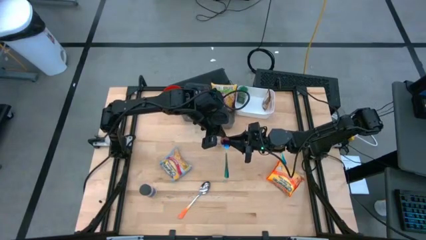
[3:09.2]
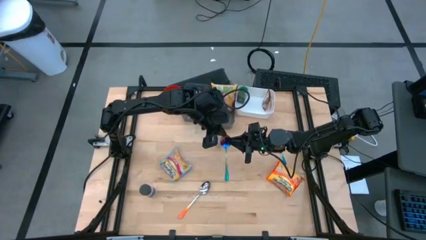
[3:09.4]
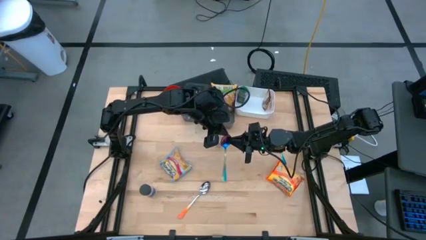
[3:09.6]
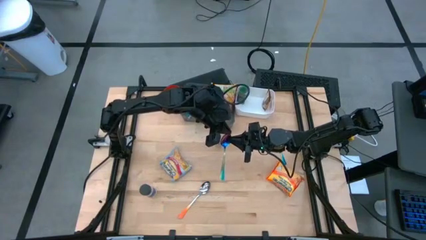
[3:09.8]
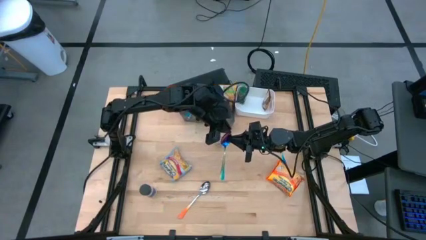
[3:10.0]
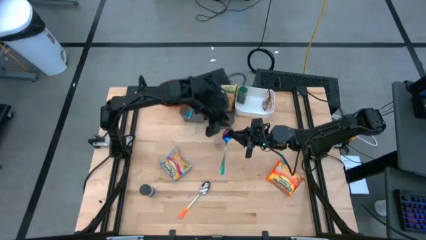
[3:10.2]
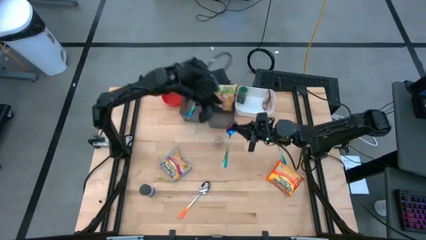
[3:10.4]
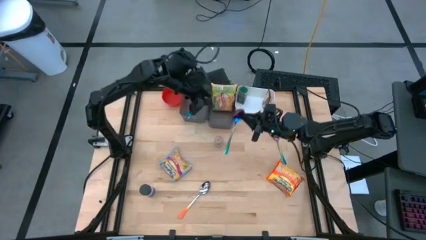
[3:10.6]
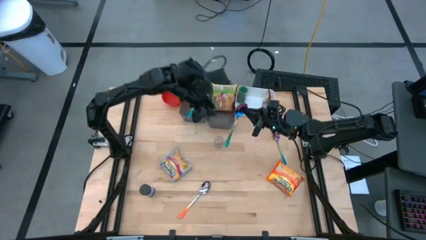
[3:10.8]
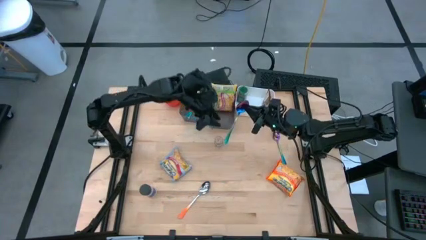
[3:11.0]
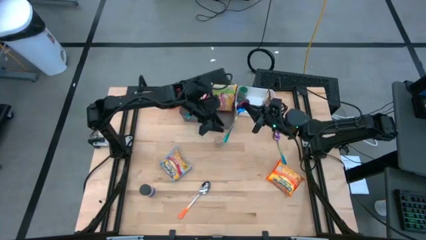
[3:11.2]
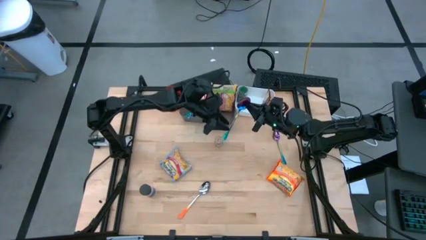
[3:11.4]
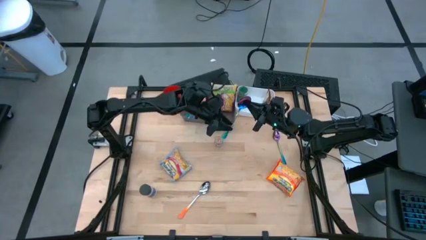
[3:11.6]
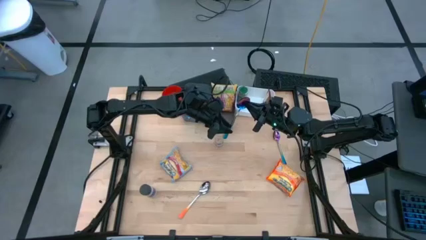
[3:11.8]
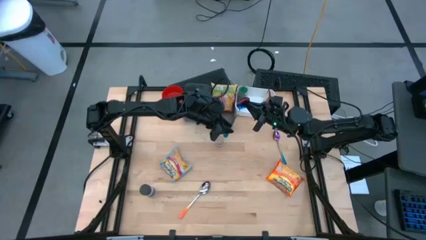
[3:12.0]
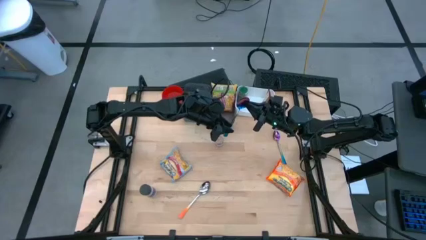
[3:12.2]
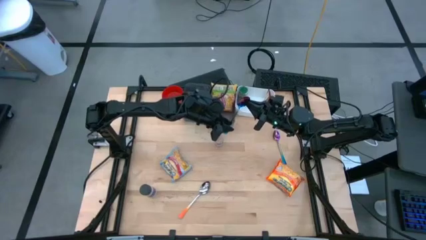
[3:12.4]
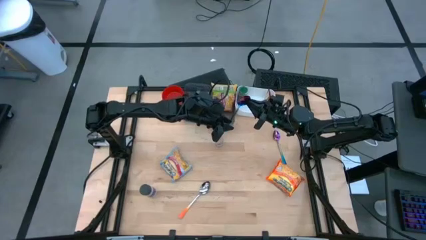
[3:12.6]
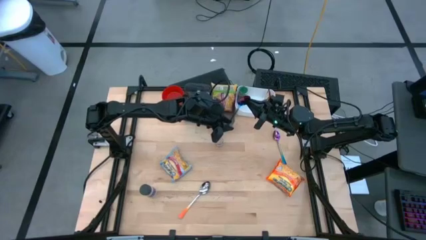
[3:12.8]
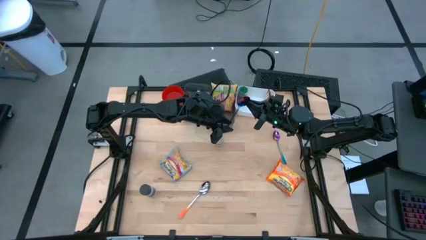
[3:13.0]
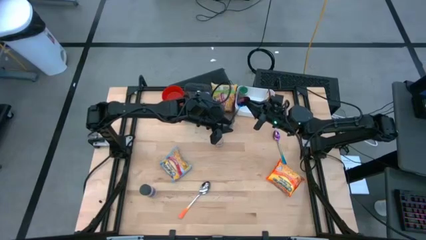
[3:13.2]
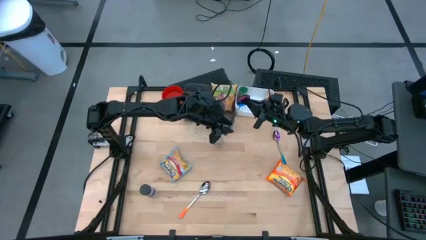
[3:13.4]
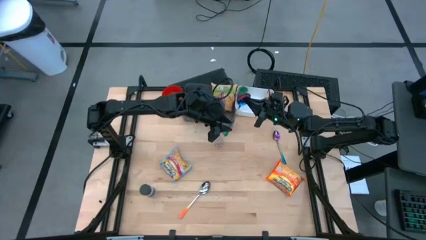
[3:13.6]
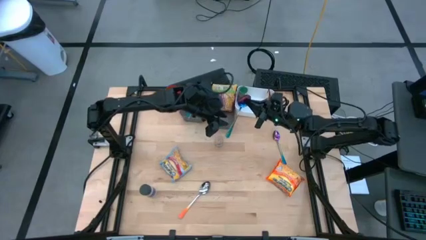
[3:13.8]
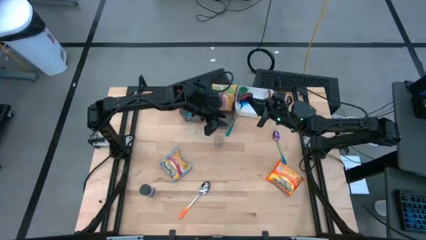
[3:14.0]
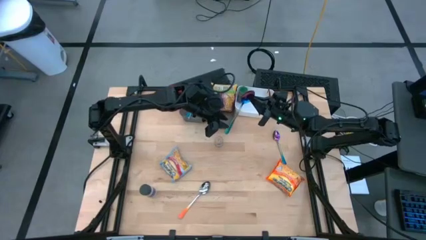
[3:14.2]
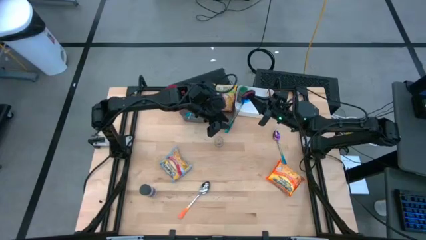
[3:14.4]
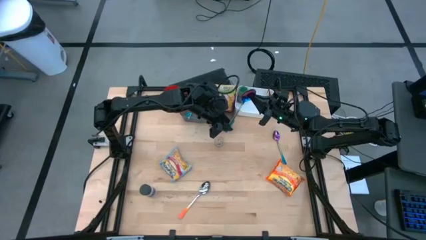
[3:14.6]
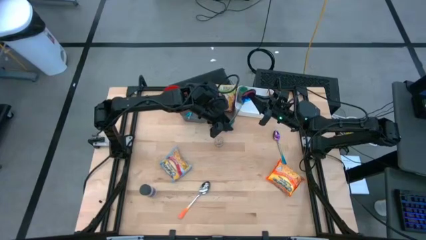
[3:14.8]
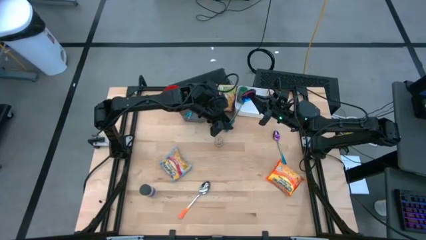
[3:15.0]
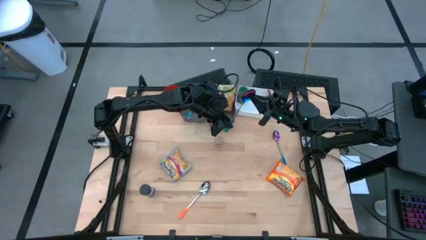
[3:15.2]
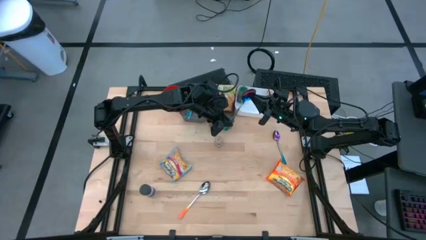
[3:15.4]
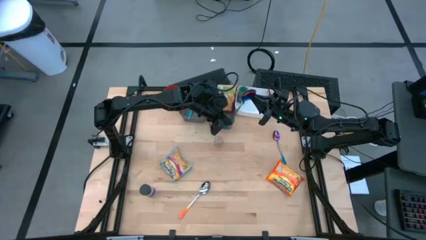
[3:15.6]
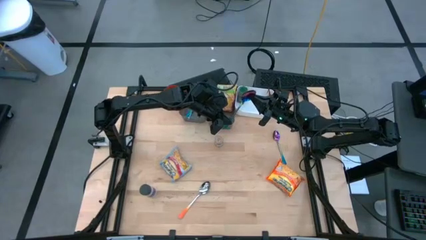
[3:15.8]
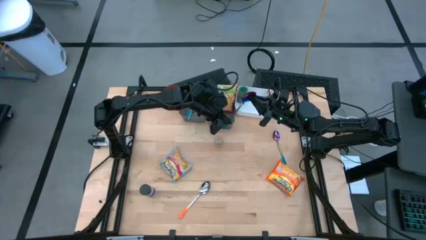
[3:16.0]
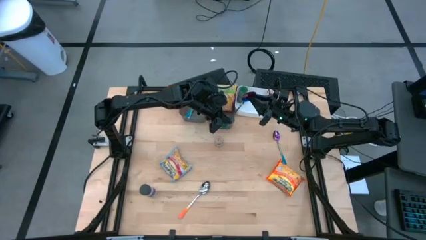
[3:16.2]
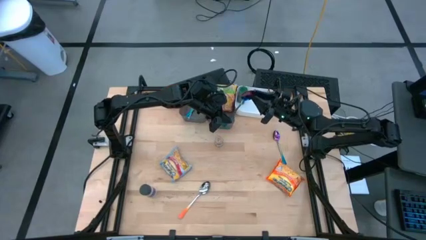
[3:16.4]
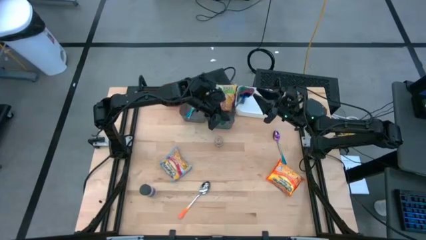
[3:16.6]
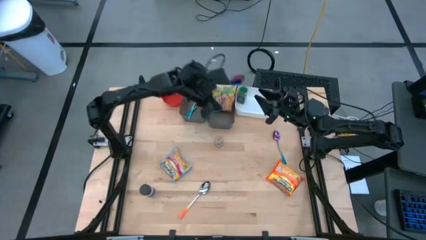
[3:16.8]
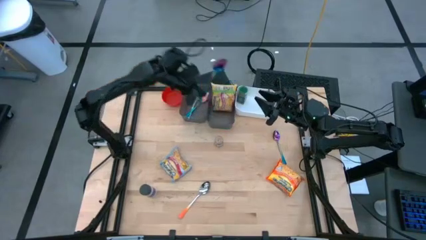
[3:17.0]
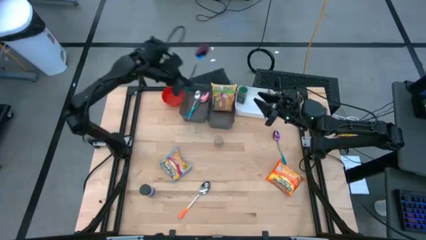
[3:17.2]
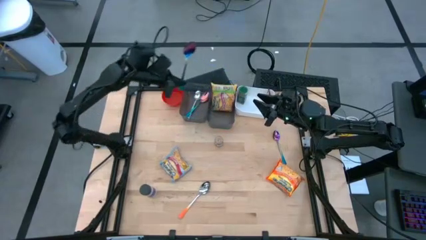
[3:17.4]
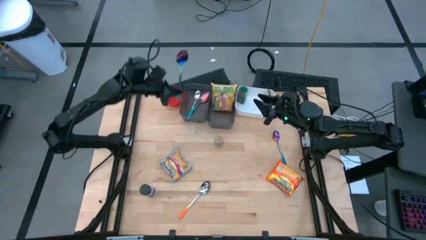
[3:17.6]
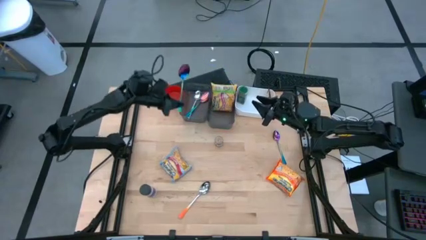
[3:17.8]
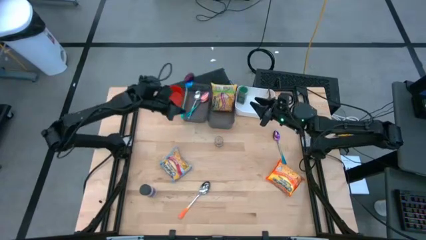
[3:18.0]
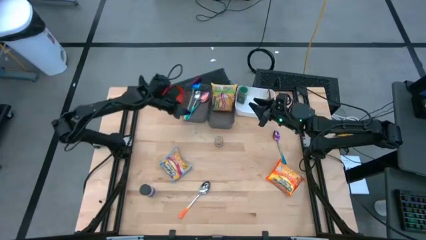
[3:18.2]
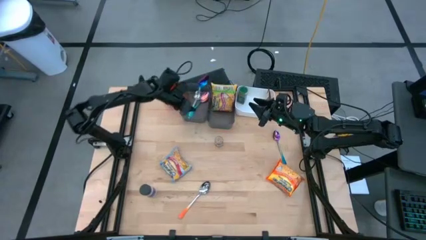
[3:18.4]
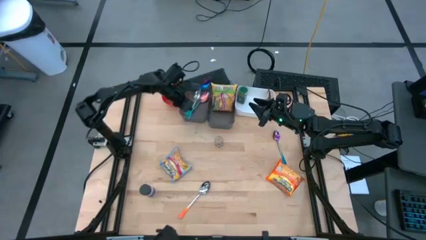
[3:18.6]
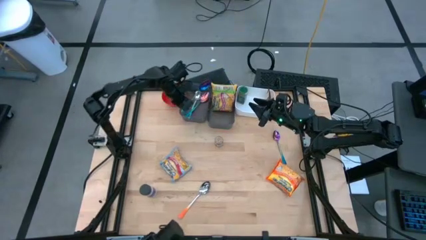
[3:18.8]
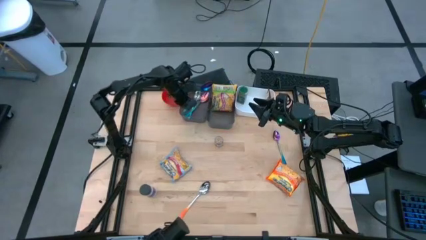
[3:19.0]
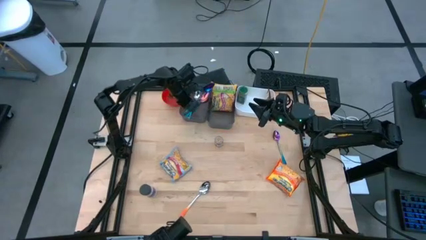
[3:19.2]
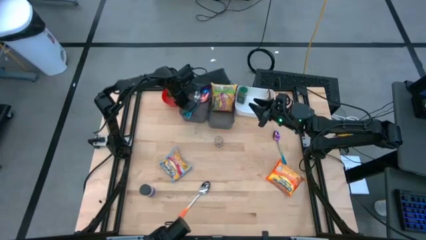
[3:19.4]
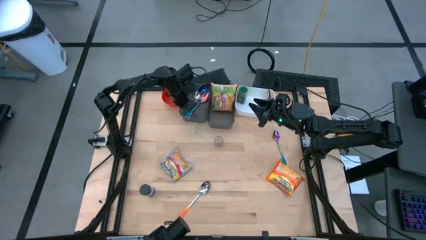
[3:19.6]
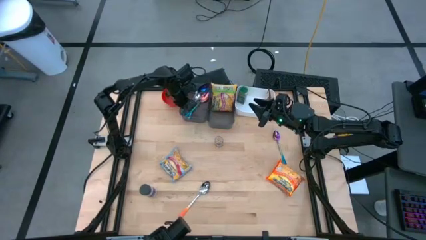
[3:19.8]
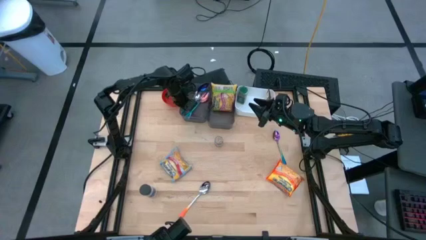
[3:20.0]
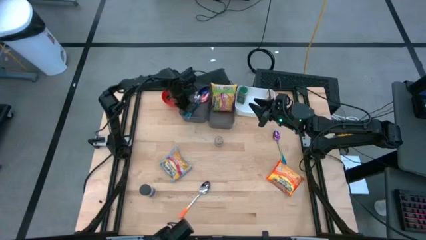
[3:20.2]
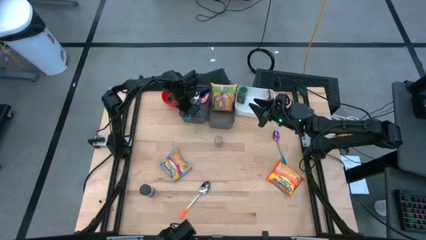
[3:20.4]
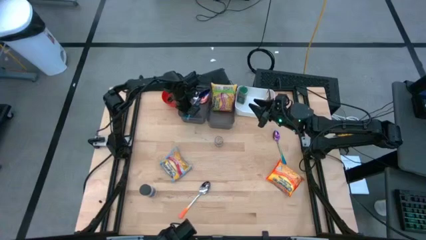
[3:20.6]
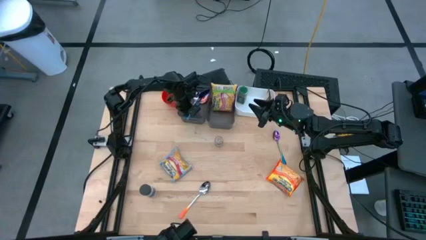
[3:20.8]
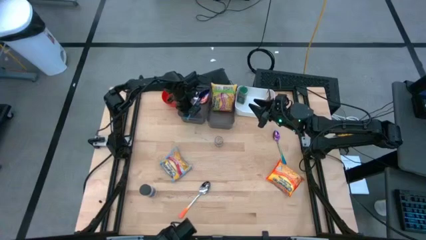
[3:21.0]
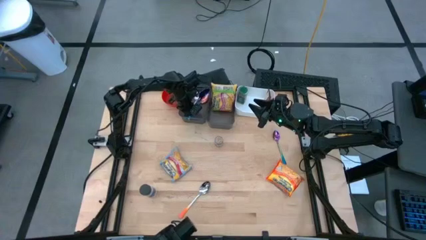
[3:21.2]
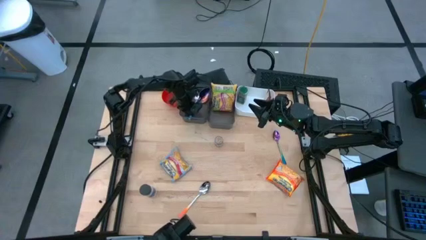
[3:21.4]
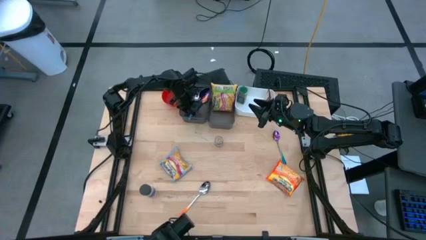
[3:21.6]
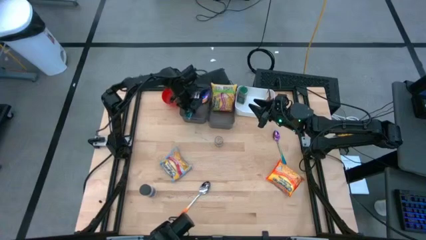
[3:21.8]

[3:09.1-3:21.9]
Task: Pick & Place Food Item
Put the bottom purple and blue spoon into the left black bin

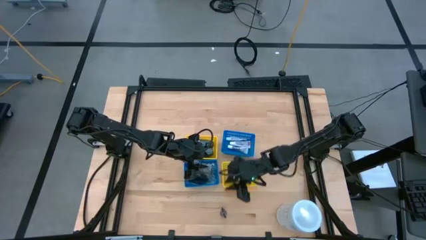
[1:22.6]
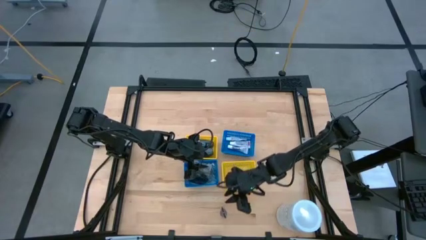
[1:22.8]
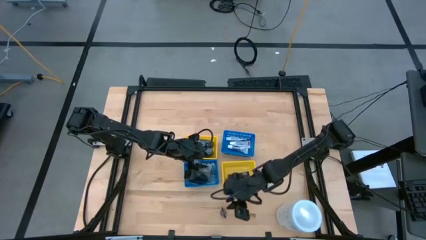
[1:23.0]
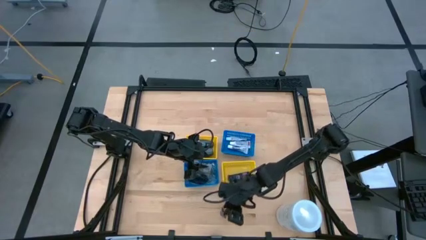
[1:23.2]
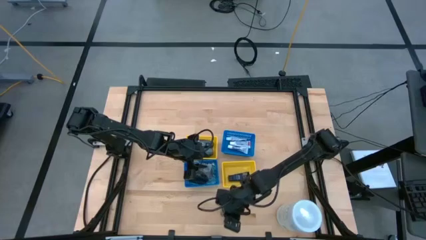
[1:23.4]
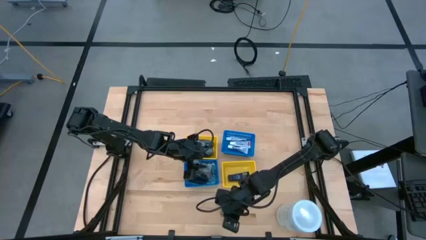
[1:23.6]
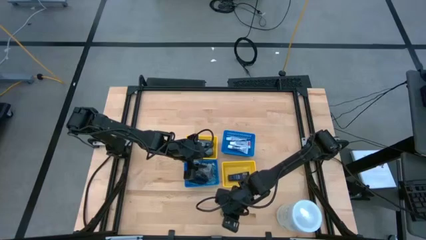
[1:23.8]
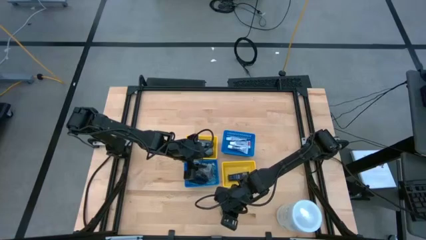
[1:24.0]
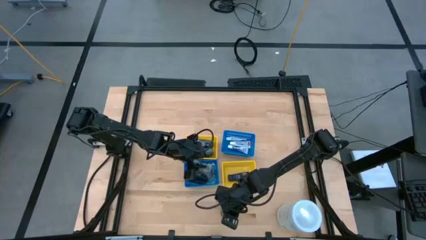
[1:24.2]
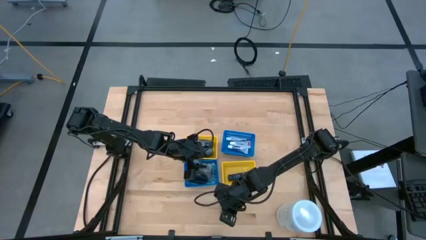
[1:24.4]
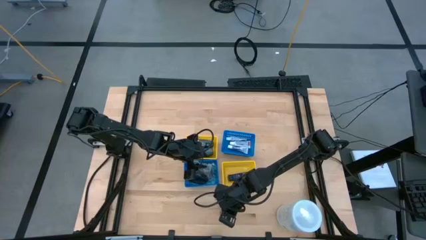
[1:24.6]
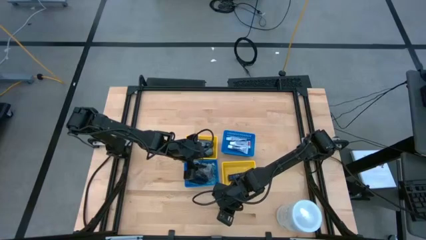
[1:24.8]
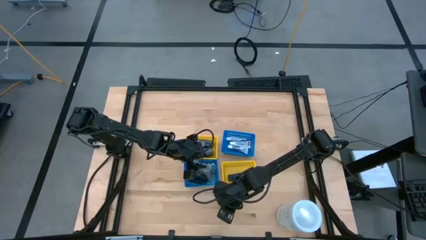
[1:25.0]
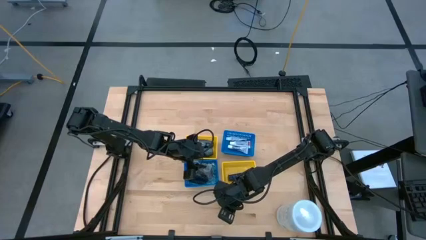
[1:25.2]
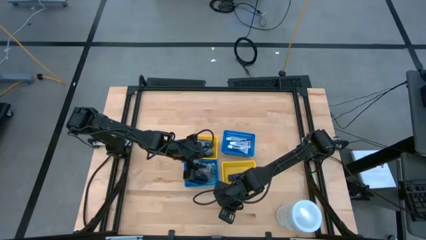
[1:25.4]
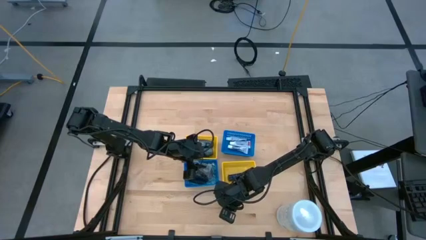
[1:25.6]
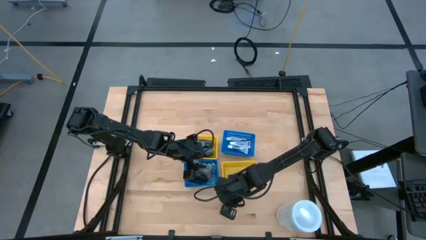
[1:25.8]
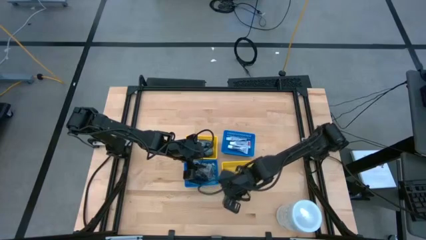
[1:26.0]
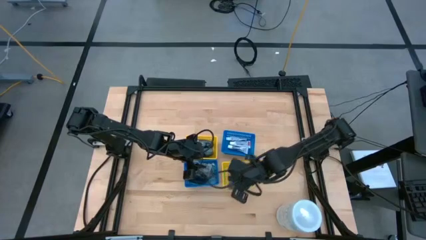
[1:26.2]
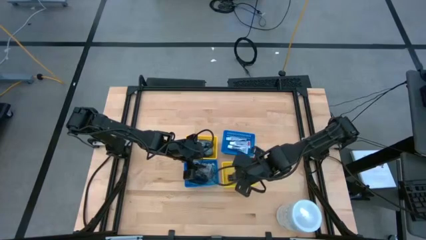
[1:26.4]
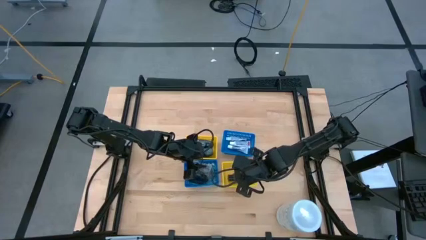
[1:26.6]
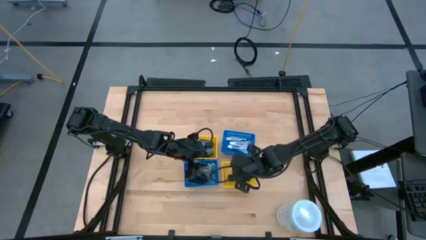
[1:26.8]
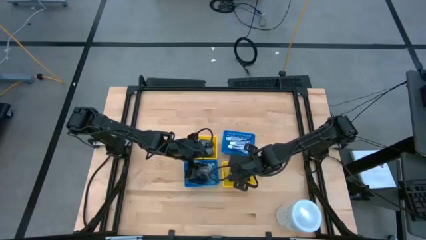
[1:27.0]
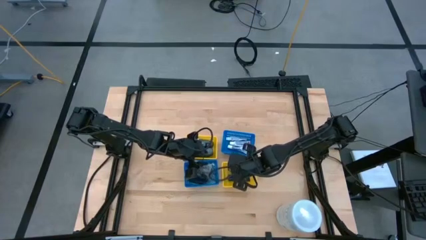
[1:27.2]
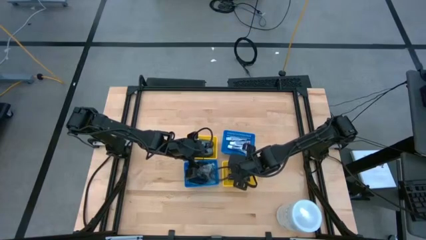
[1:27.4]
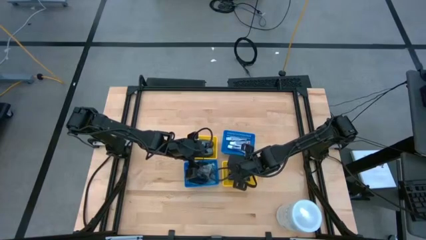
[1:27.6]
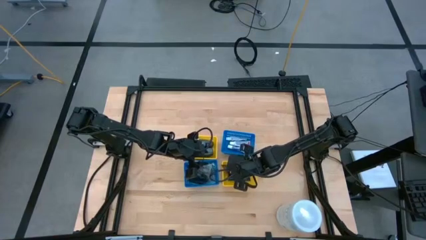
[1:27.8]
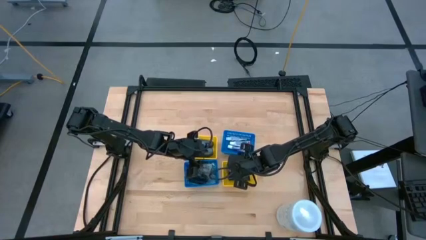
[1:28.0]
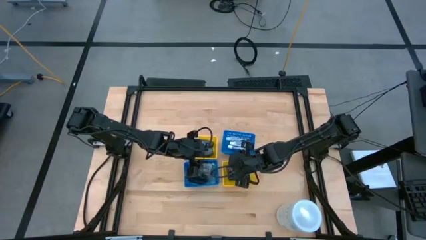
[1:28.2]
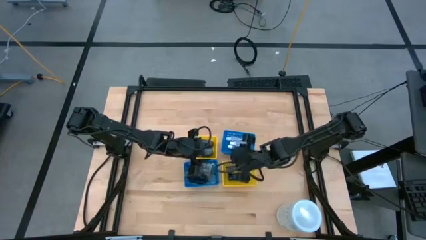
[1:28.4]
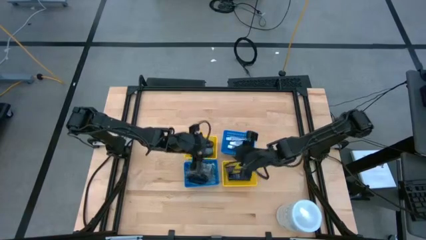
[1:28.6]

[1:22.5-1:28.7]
Task: Pick & Place Travel size toiletries
Put the shaving cream into the bottom right yellow bin
